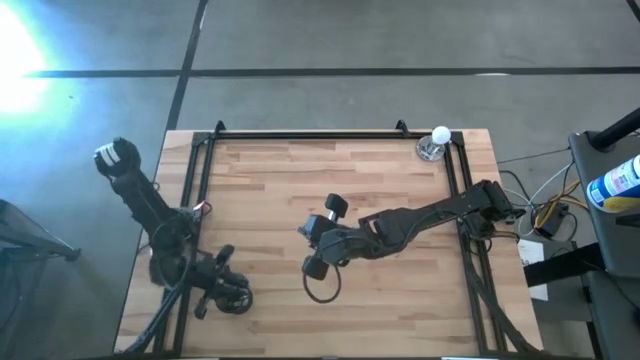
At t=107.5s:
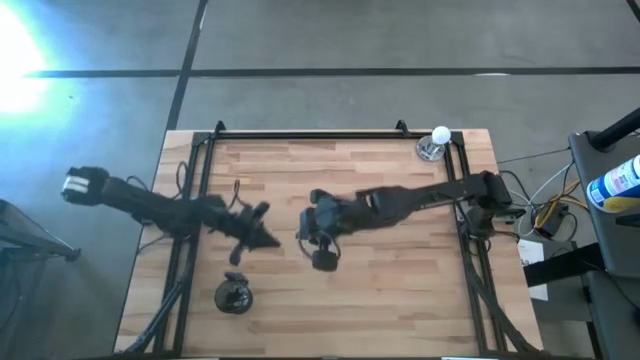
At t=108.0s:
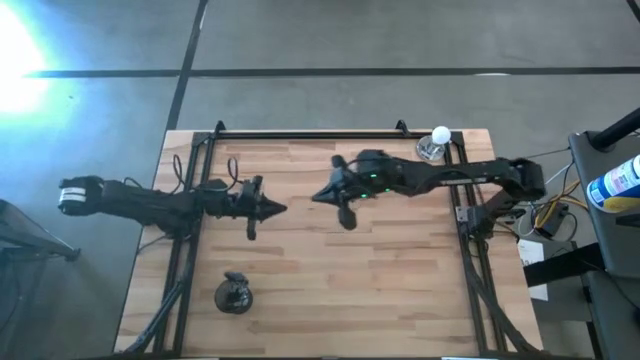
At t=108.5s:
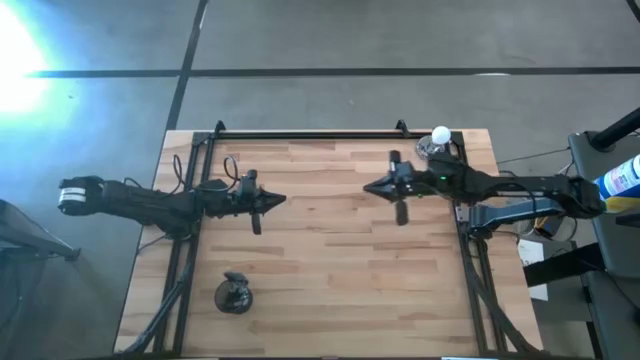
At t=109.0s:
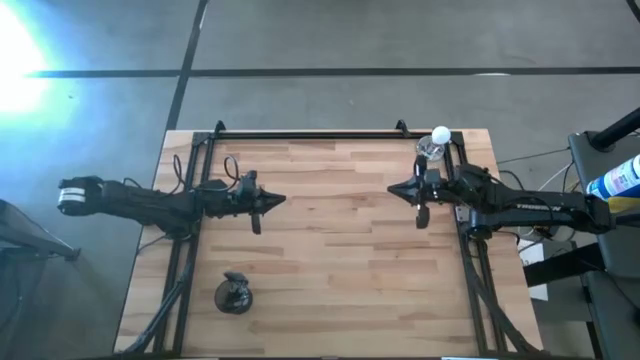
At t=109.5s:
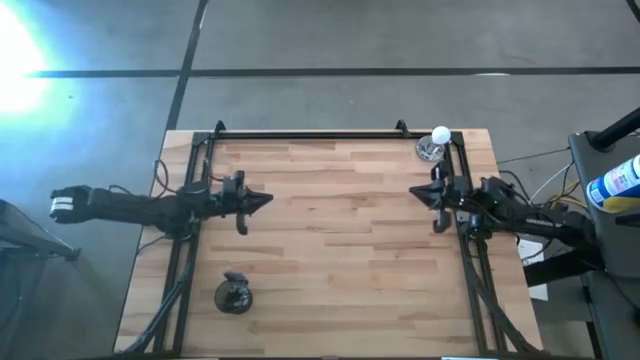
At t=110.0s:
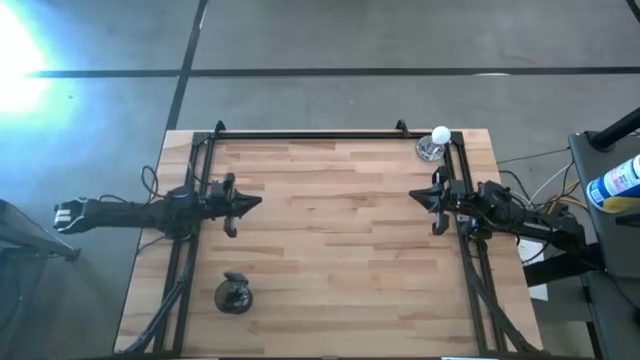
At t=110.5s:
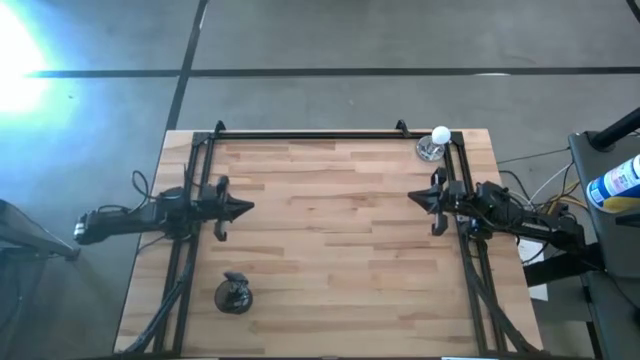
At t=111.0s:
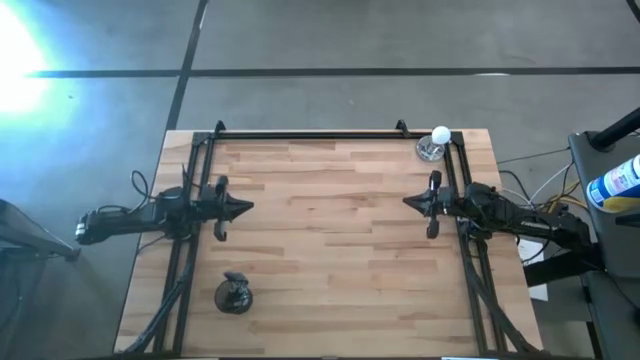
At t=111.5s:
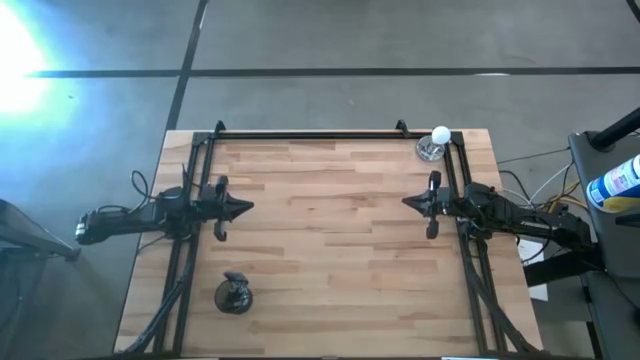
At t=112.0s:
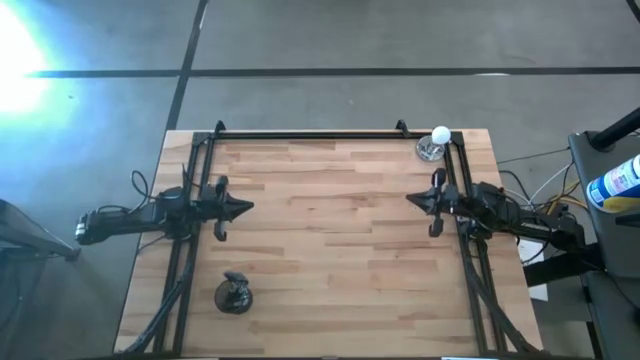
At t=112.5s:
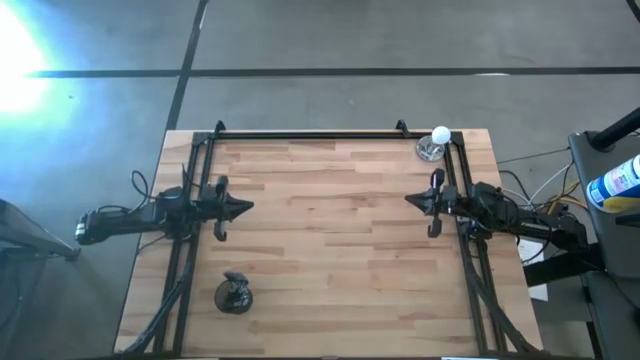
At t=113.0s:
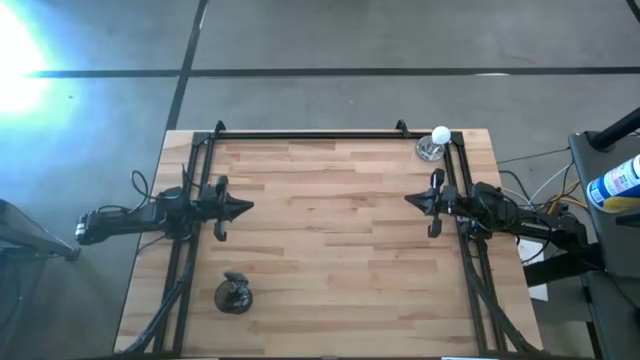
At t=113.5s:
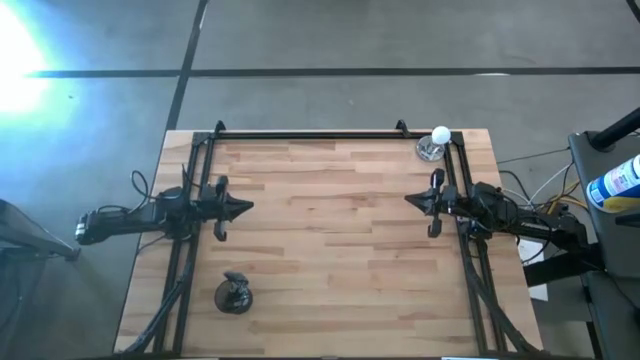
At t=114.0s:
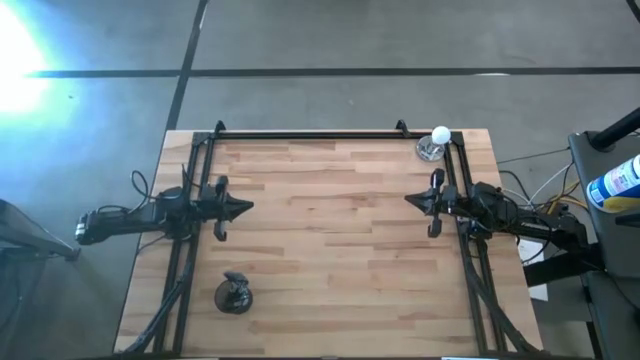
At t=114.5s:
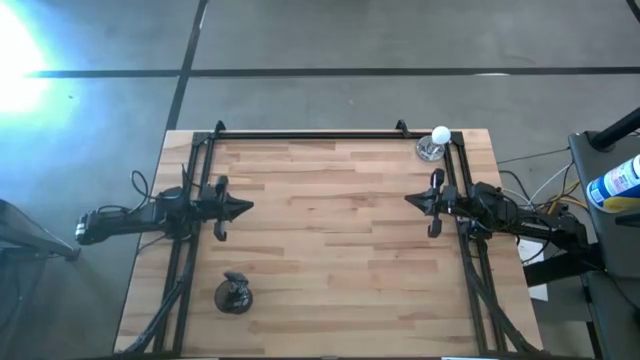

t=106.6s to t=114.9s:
Task: Pick & Place Makeup Brushes
Return to Home Position

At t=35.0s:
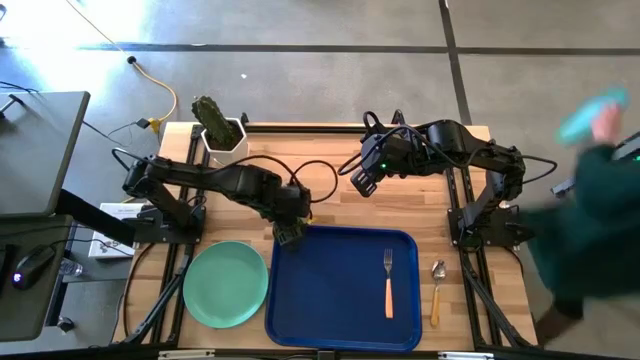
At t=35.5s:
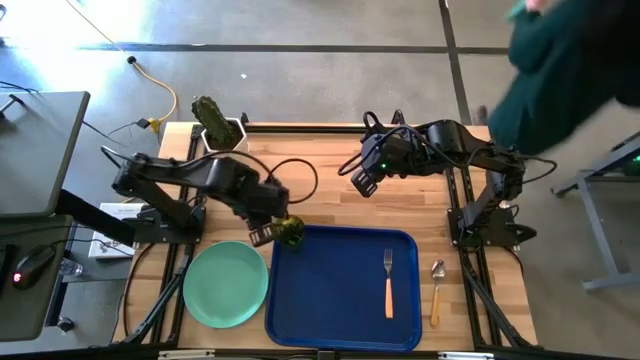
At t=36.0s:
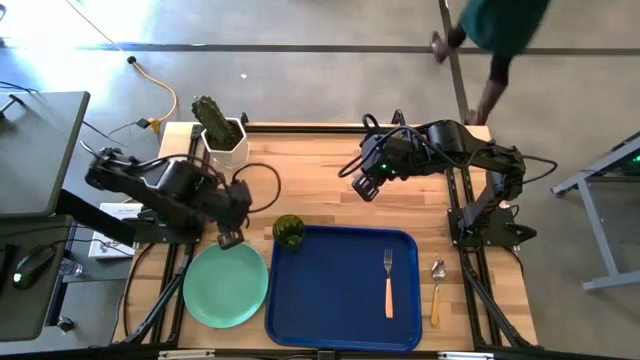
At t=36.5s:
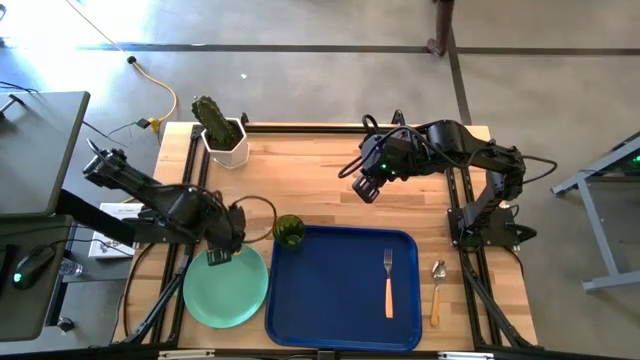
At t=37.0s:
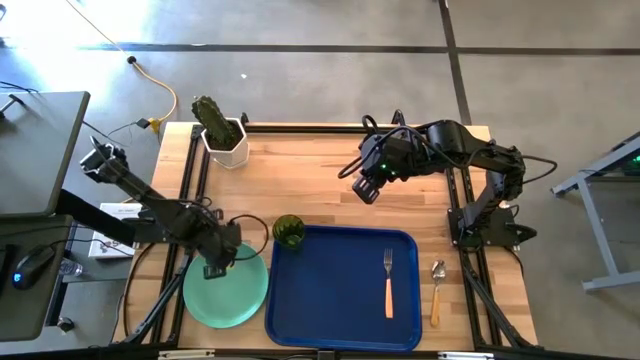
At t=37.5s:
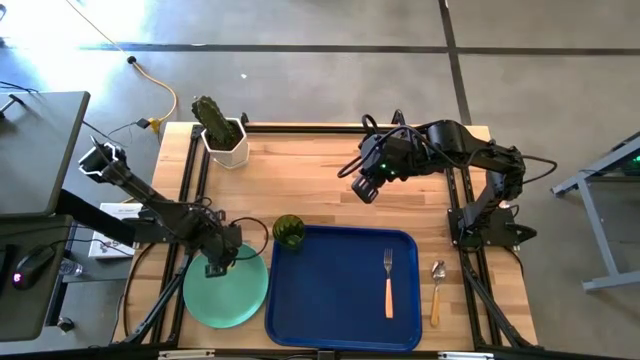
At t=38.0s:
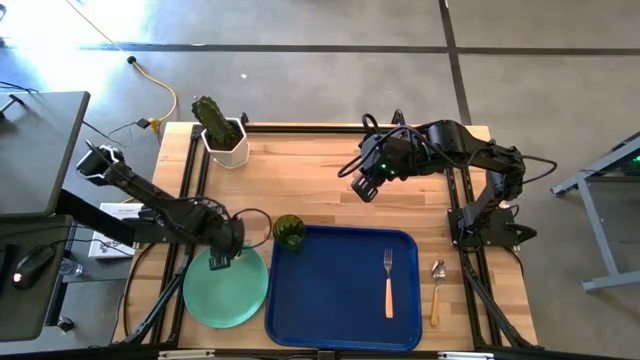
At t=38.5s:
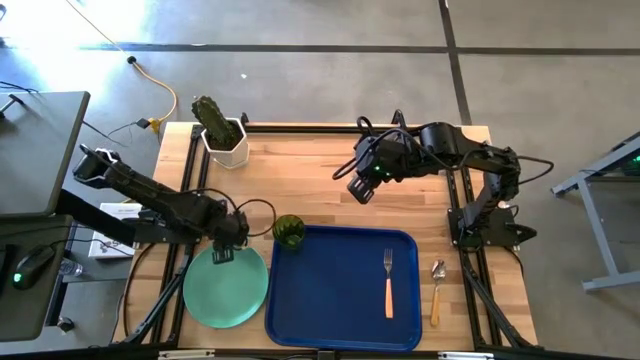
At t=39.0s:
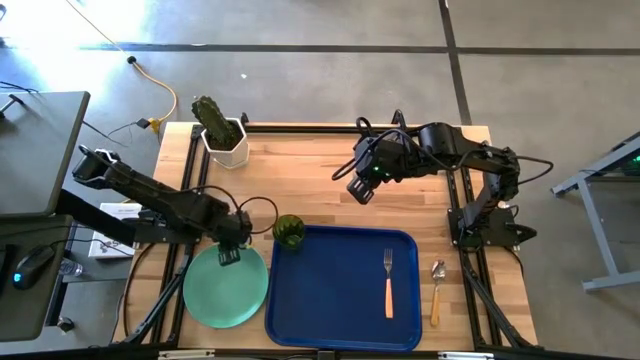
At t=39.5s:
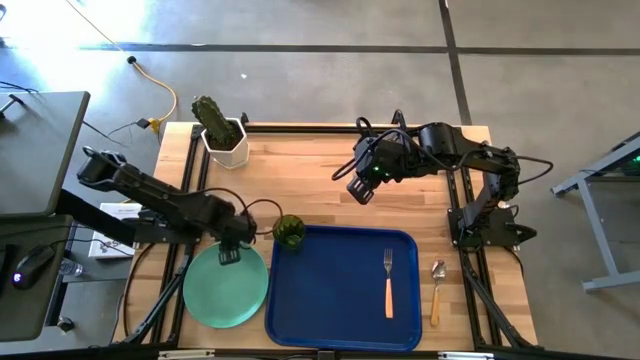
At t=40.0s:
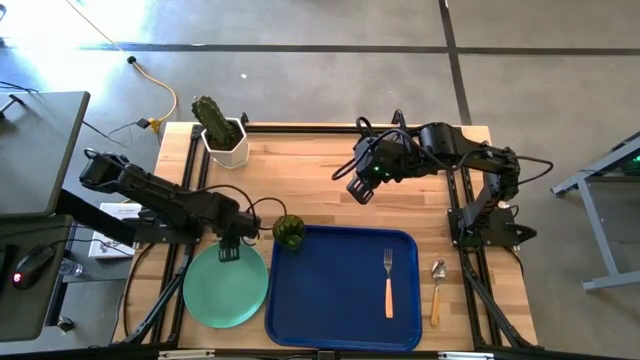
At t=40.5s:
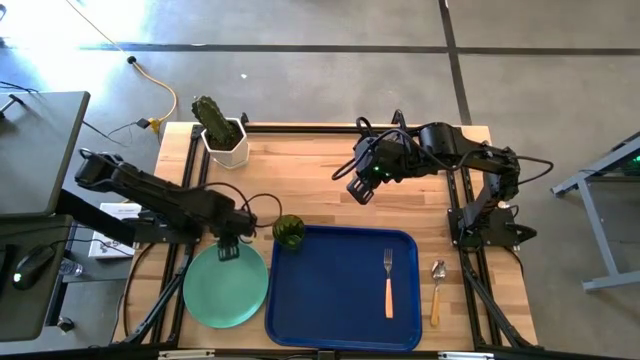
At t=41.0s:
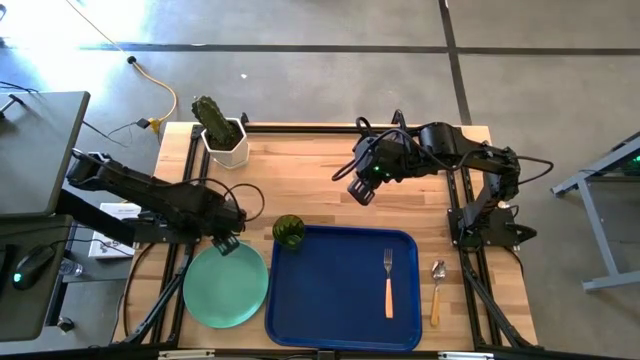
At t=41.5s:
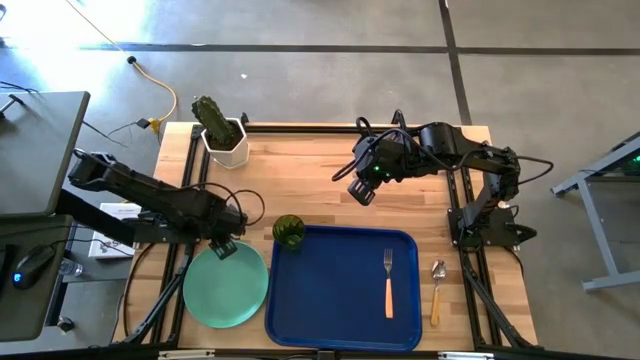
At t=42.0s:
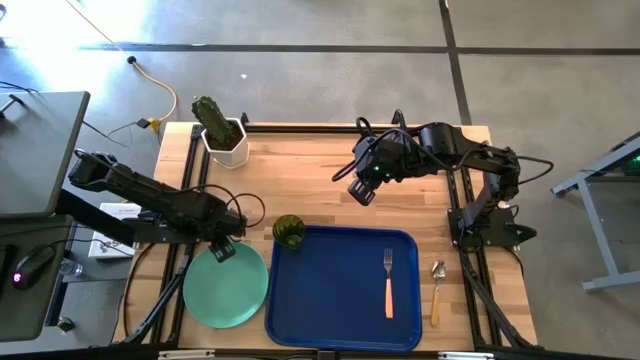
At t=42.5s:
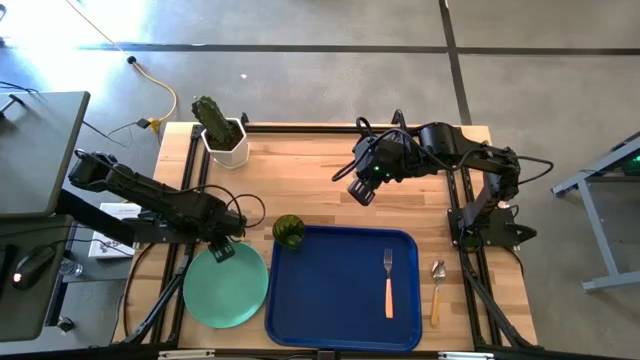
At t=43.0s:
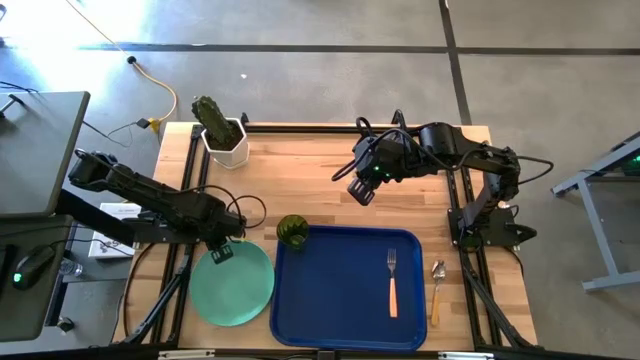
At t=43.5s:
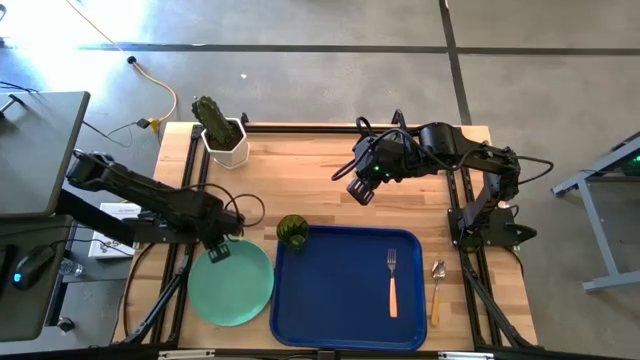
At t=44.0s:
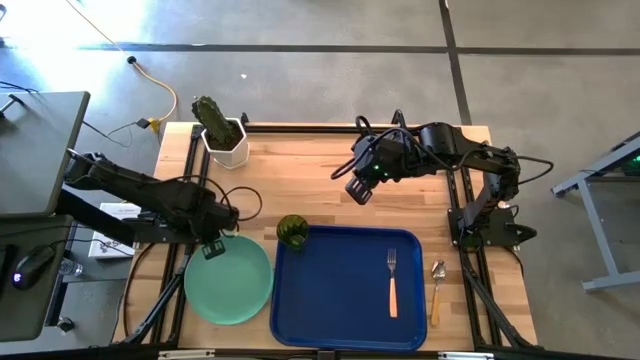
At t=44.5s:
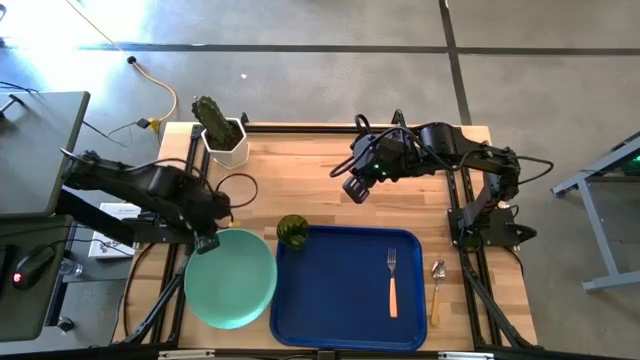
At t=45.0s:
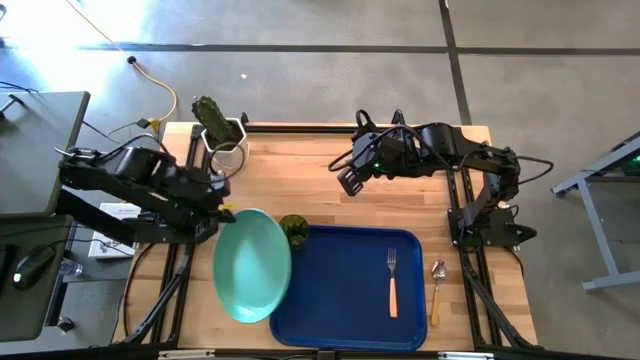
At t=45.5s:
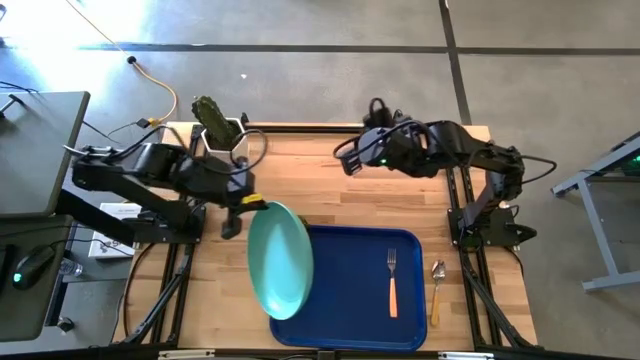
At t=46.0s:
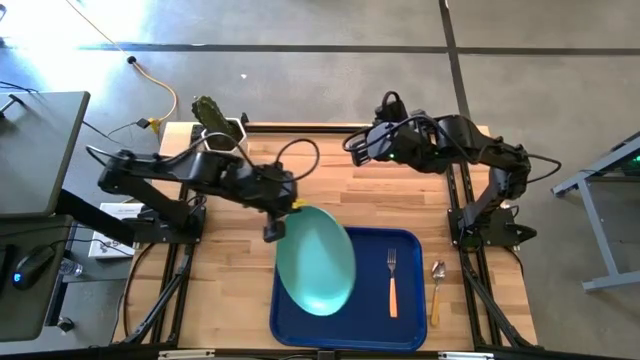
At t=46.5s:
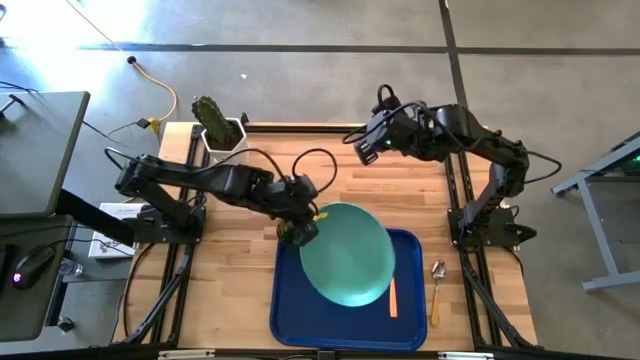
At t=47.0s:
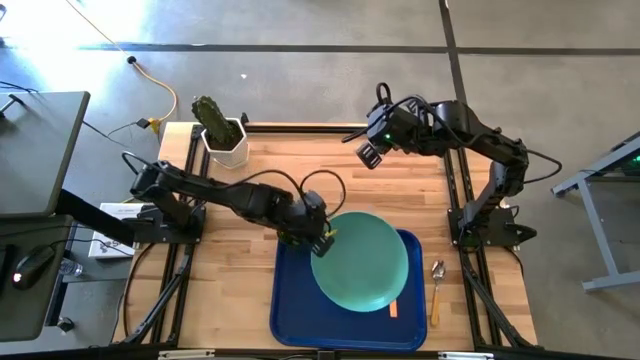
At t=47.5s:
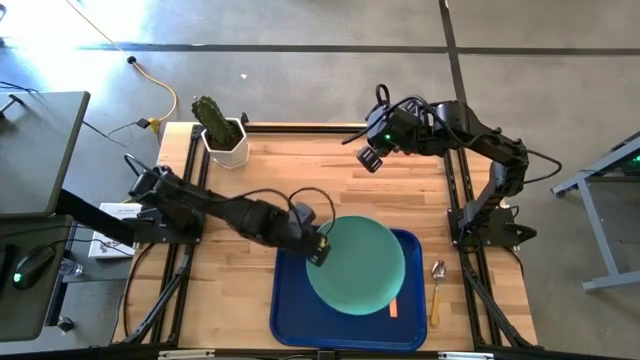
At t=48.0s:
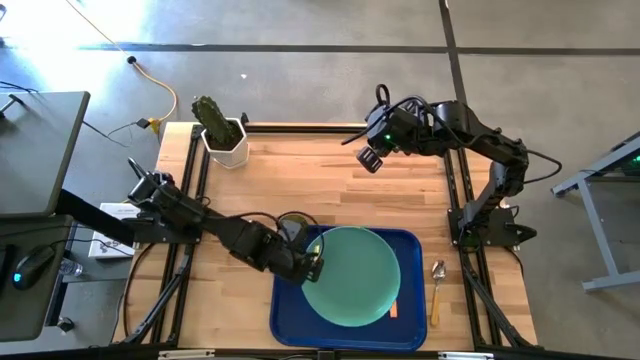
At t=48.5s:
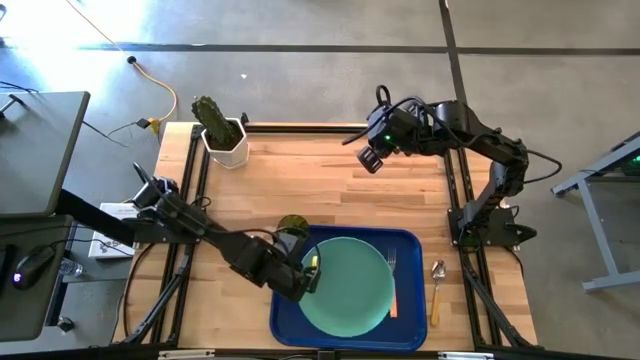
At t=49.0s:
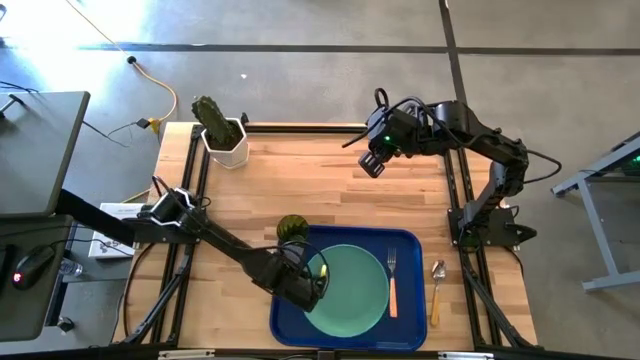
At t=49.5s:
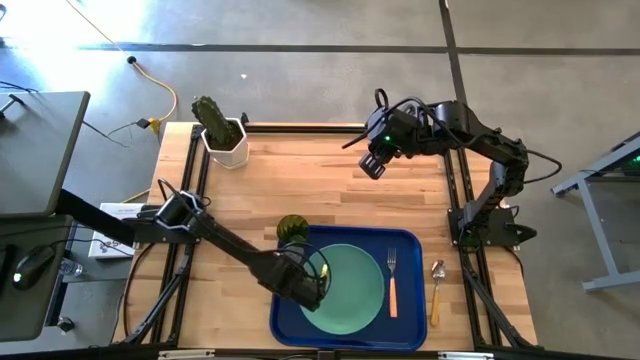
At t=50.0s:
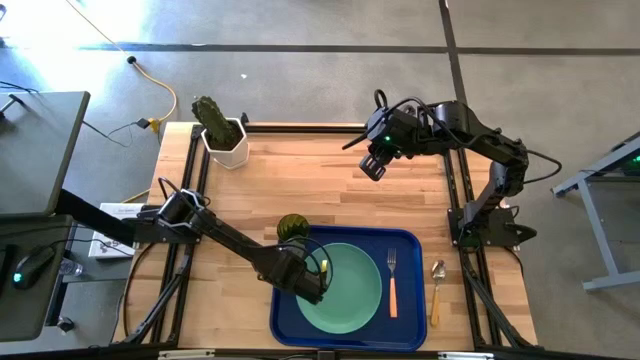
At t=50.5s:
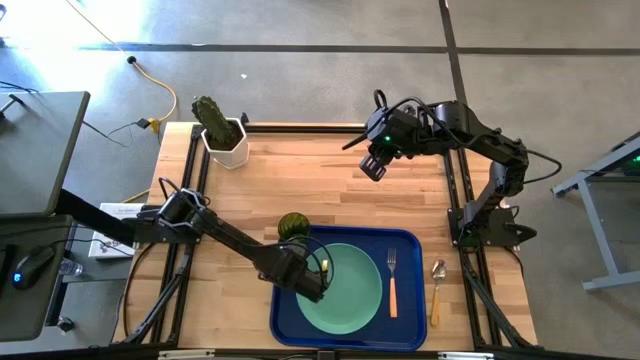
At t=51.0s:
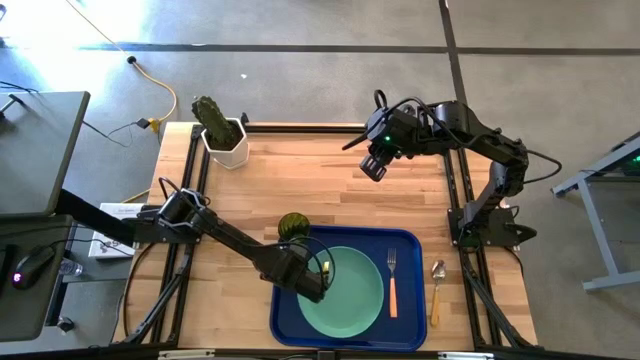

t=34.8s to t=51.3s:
Task: Pick and place plate/cup/fork/spoon on tray
Put the light blue plate to the left of the orange fork on the blue tray
